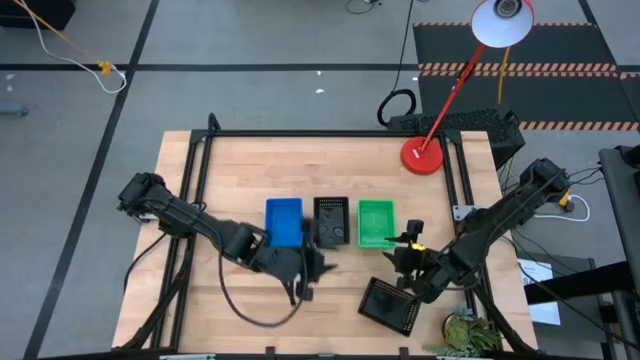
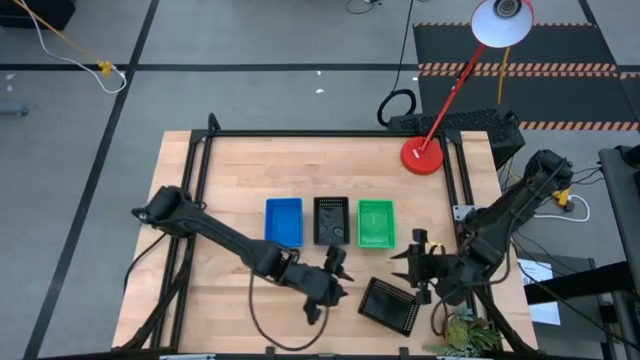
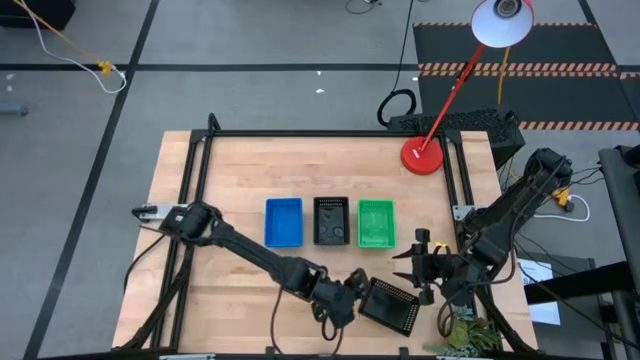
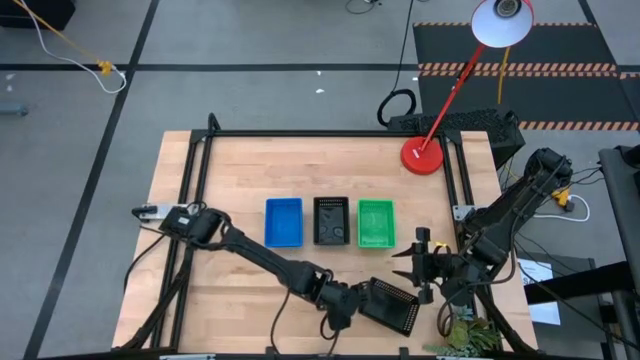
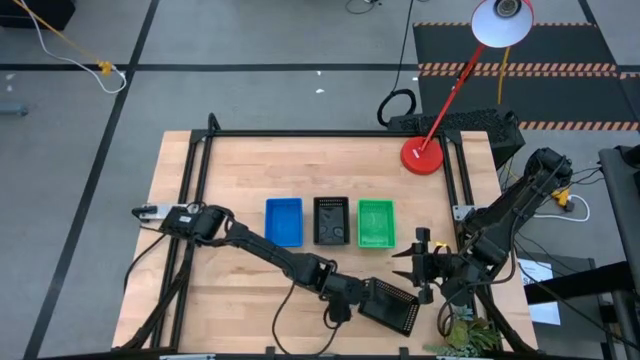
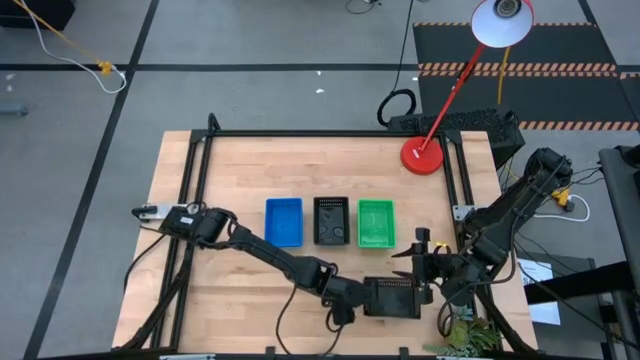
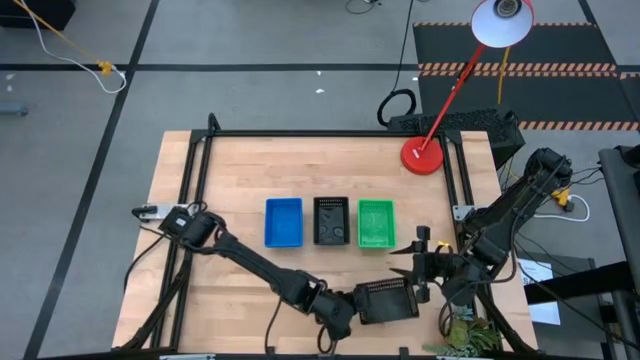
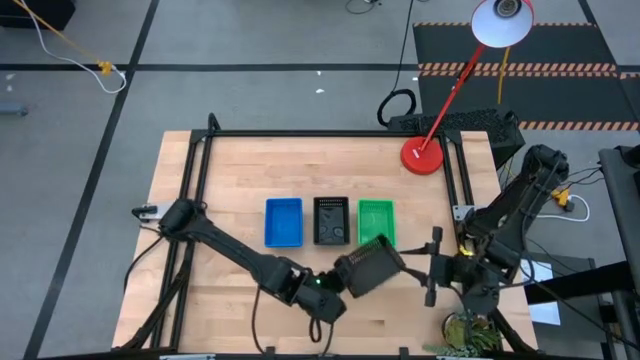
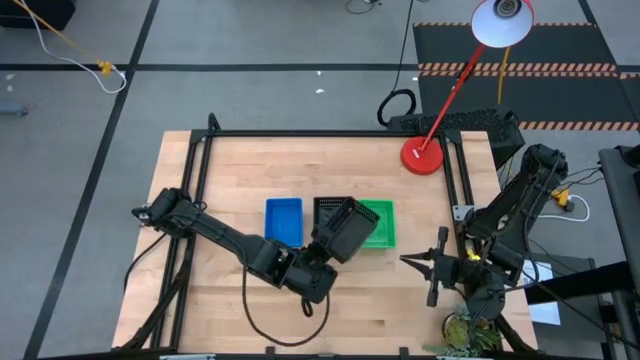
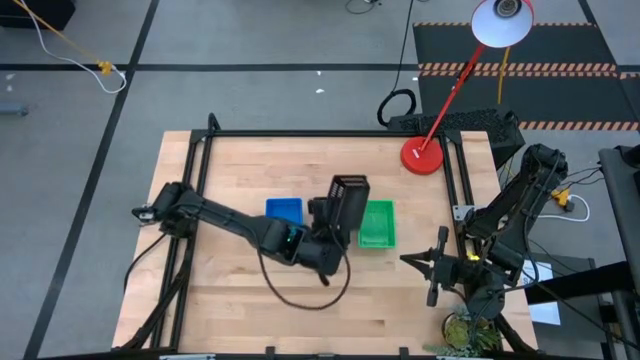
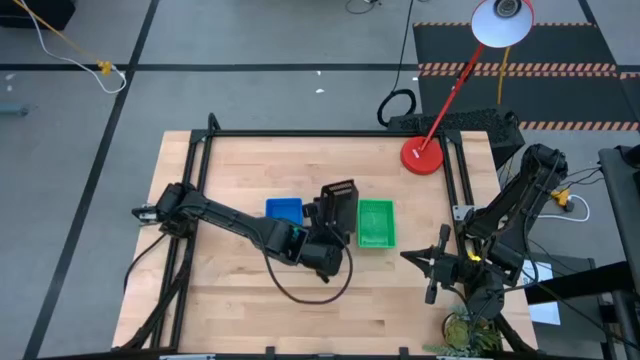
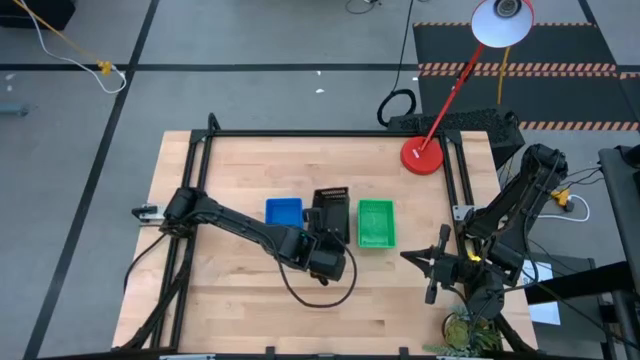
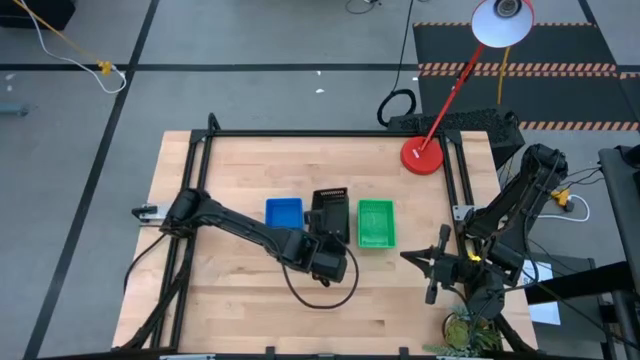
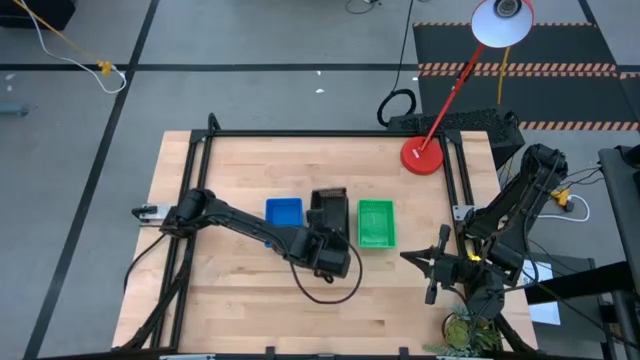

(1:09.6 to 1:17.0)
Stack the black bin on top of stacked black bins

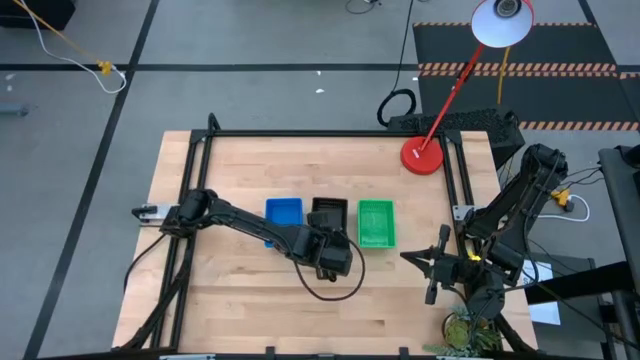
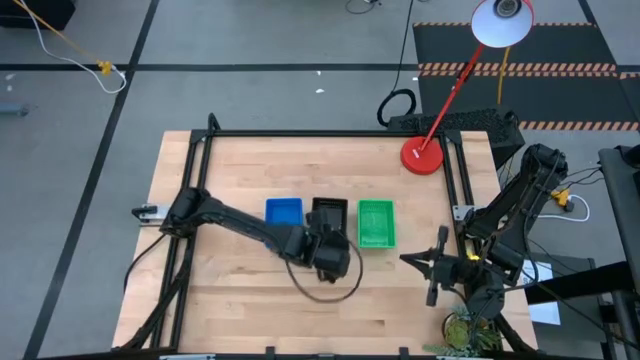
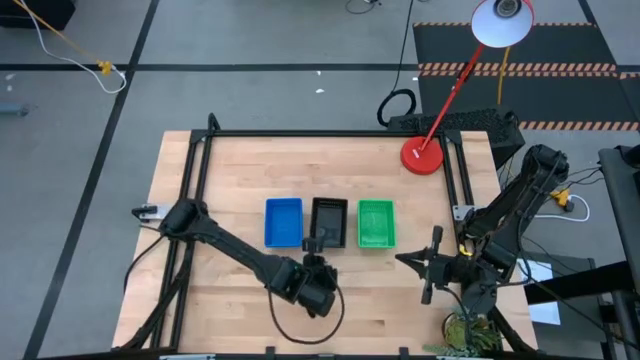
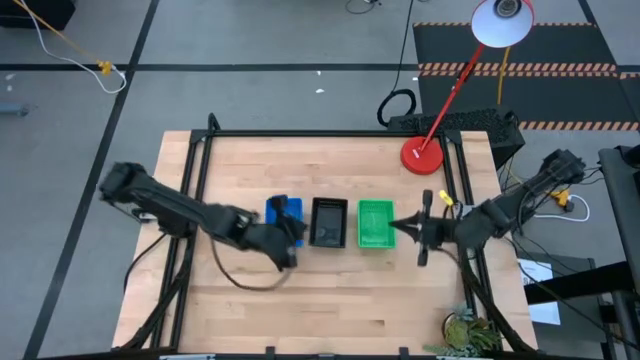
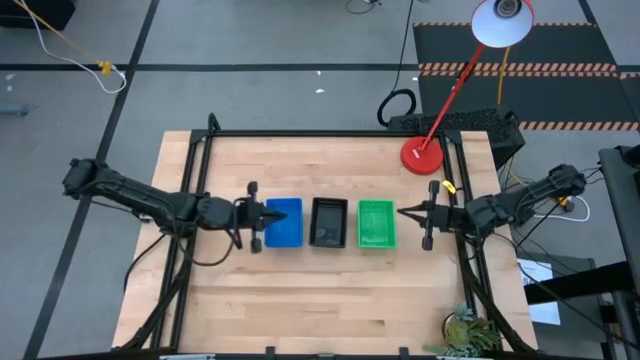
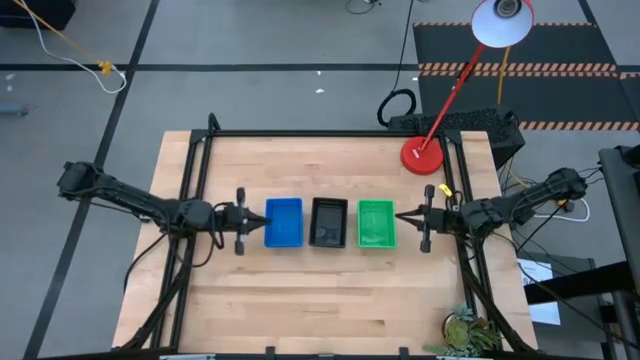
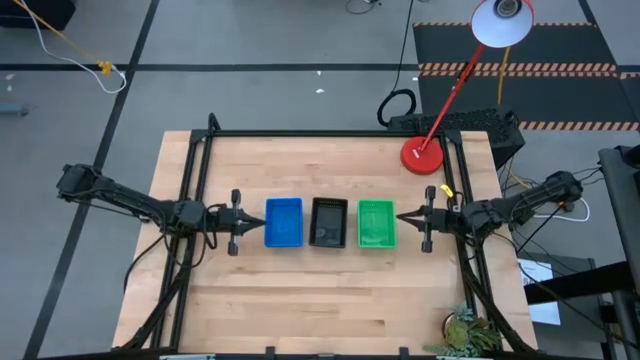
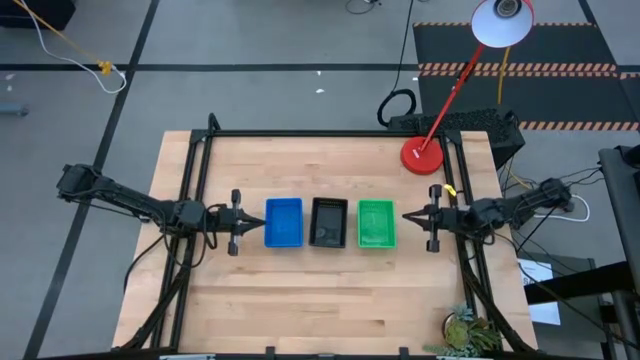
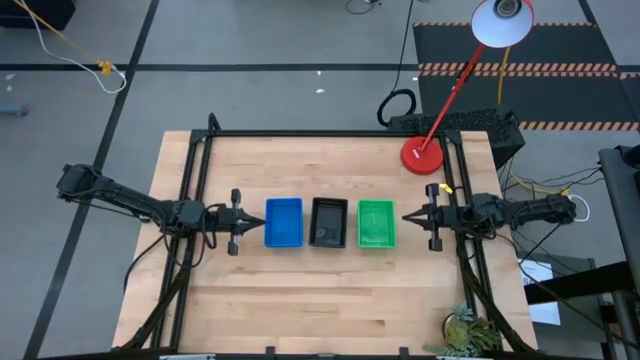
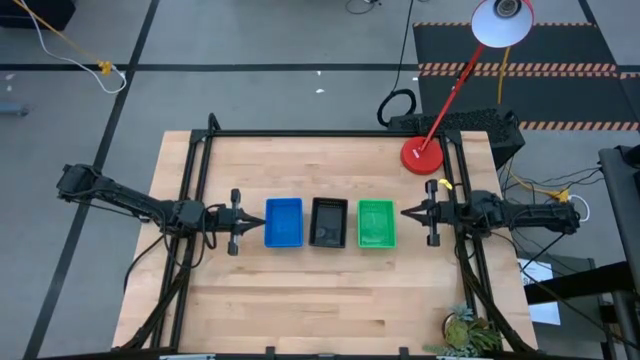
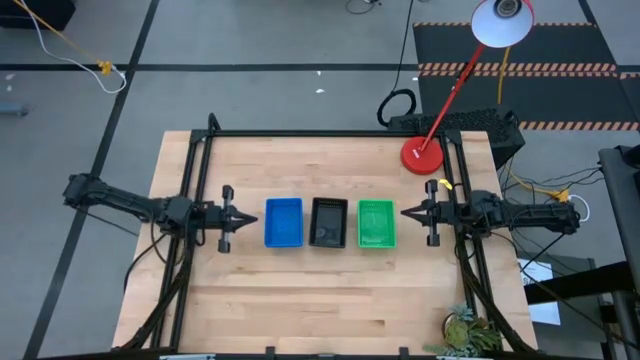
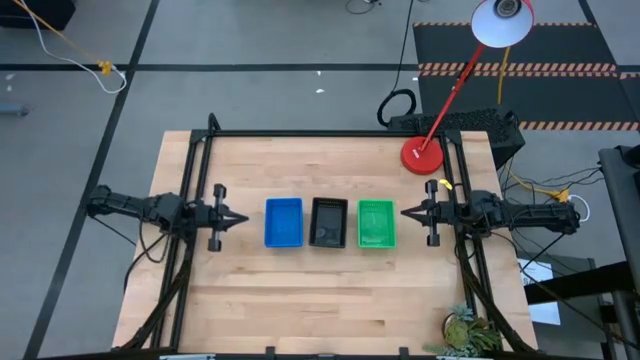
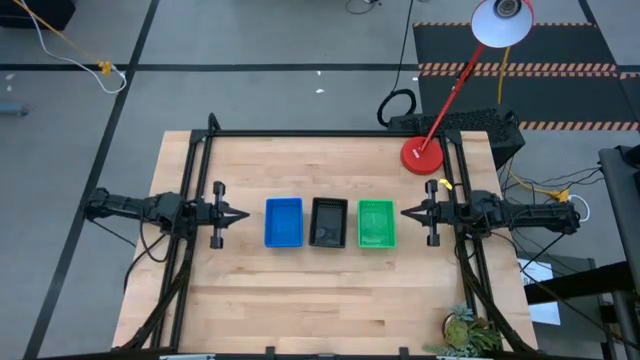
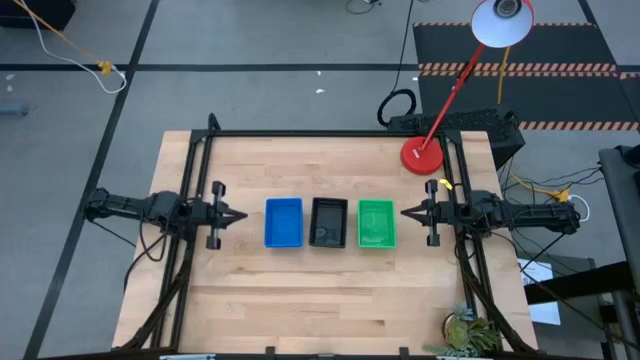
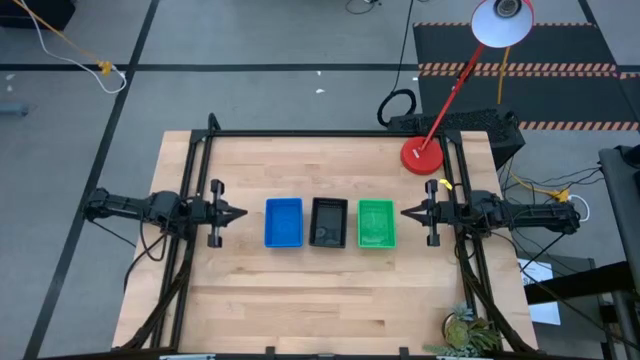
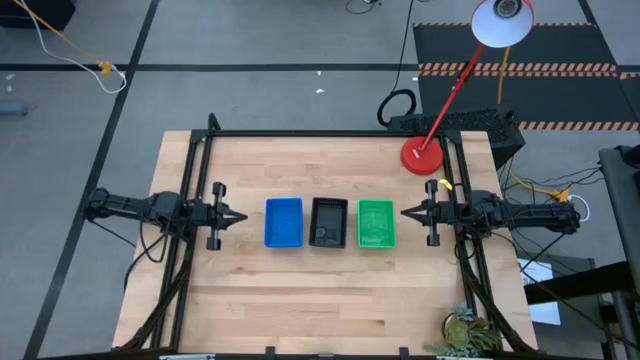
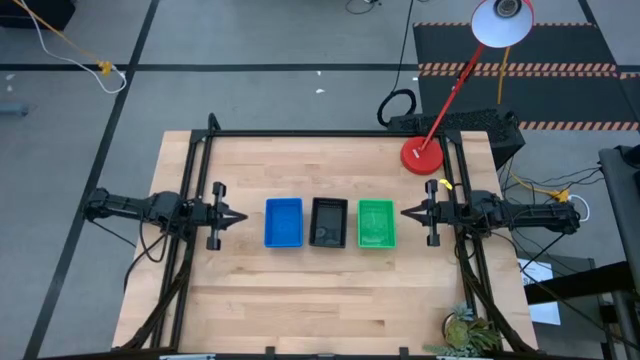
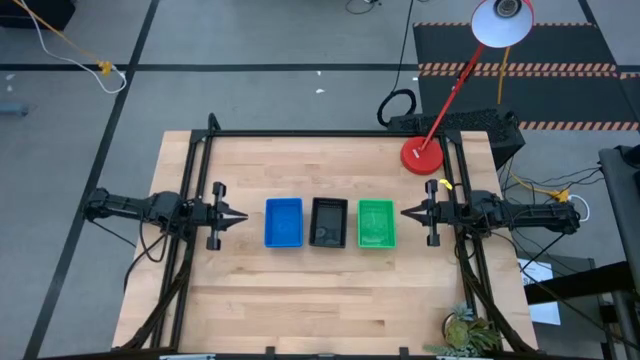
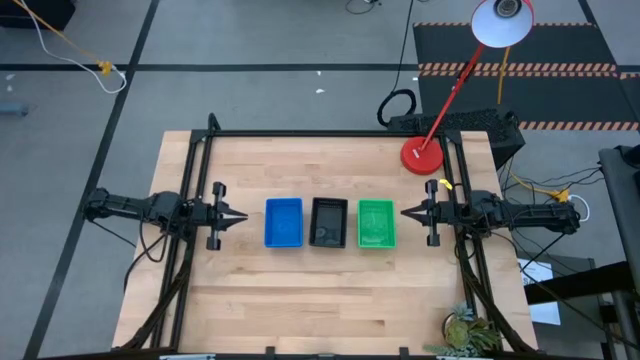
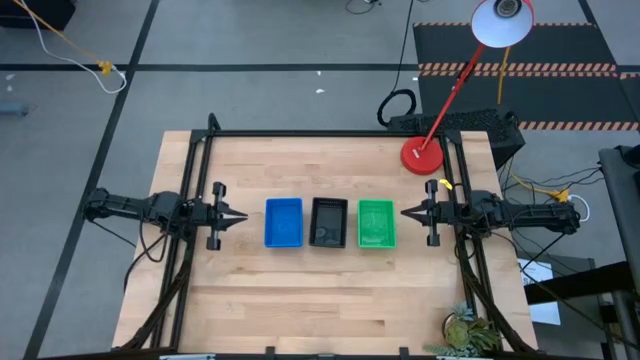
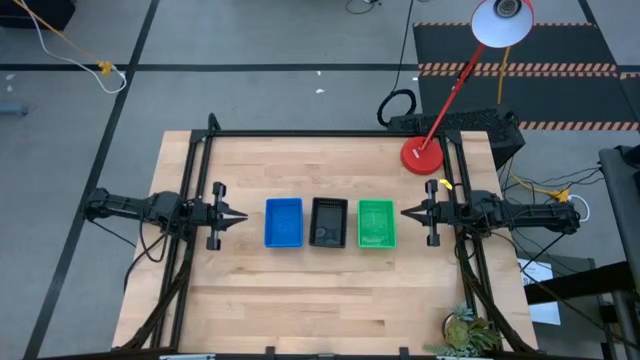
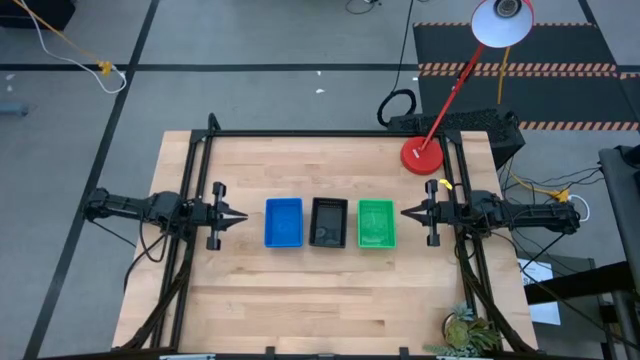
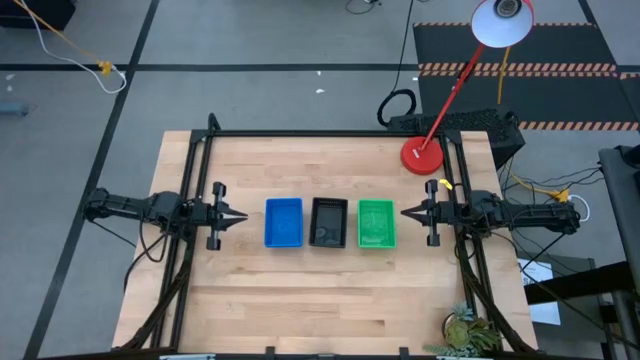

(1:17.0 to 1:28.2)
Return to Home Position

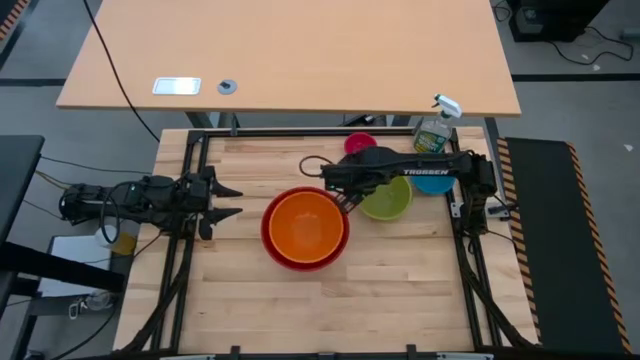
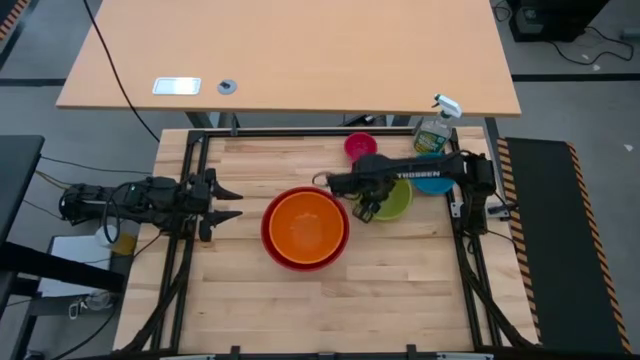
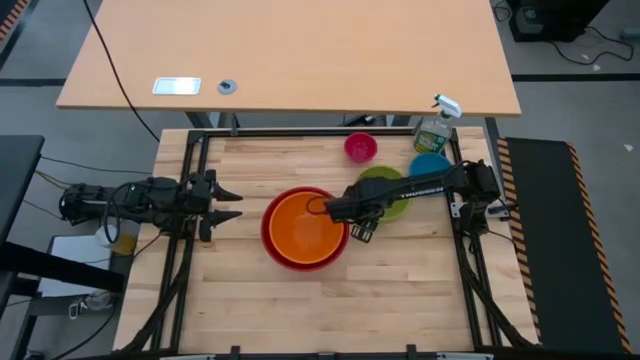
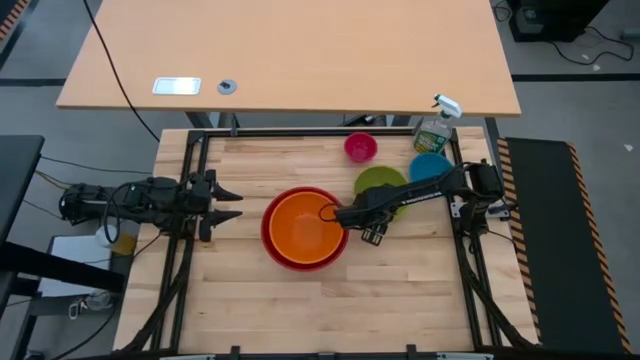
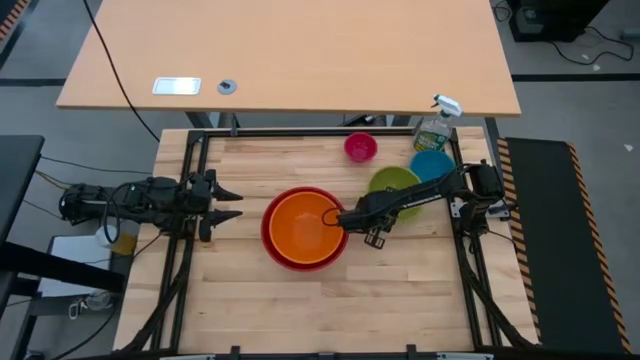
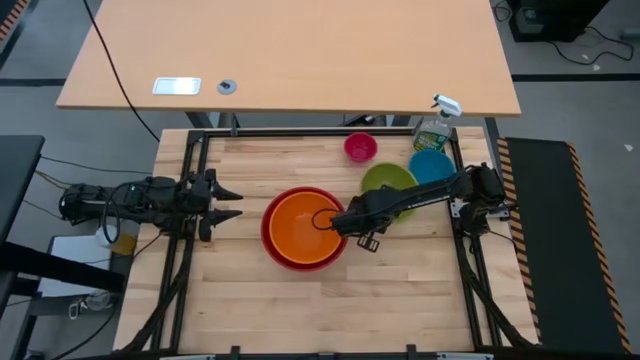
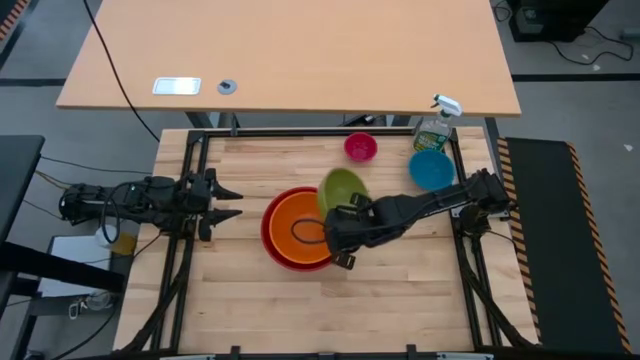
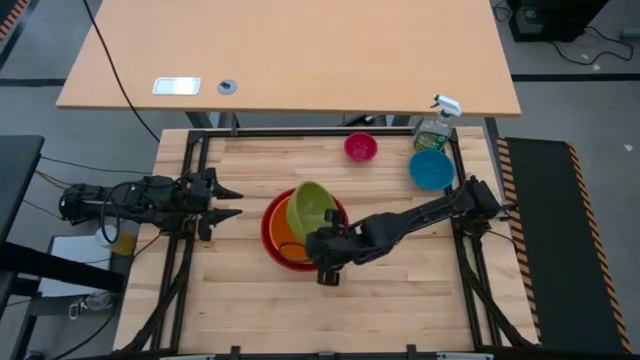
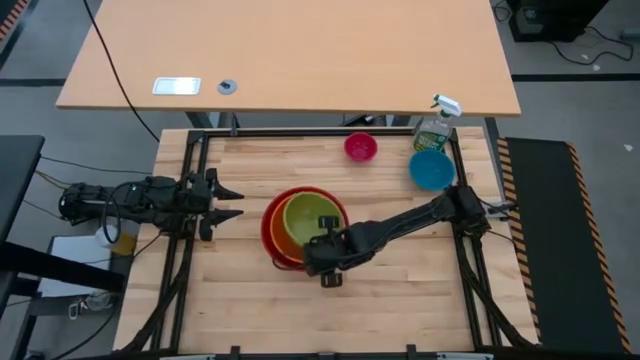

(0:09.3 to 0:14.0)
Stack the green bowl on top of the orange bowl
